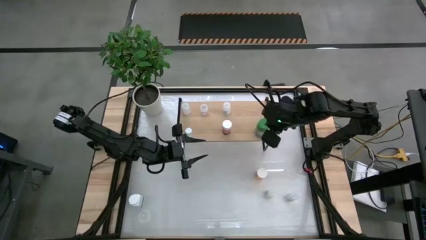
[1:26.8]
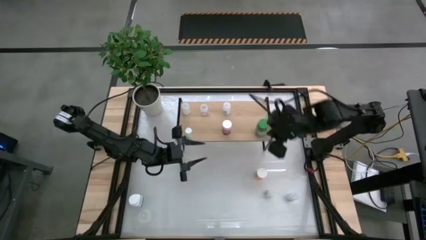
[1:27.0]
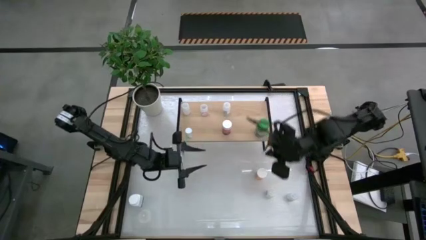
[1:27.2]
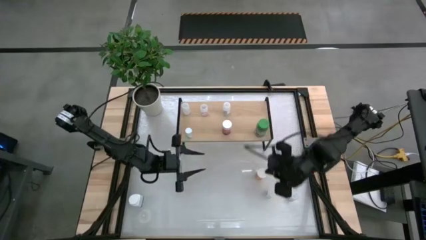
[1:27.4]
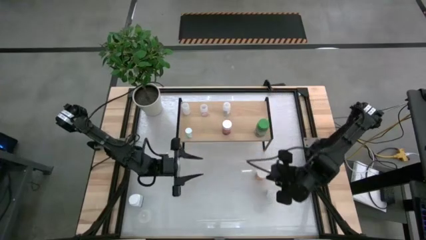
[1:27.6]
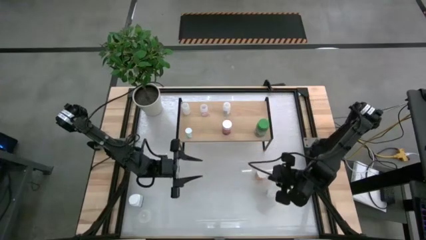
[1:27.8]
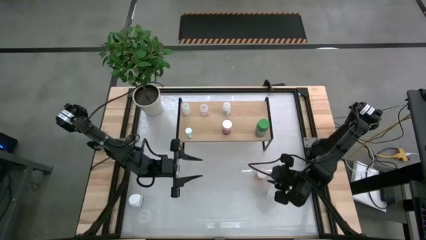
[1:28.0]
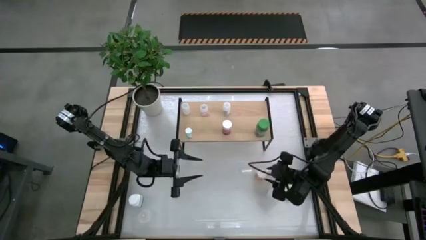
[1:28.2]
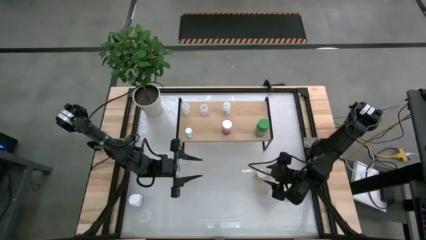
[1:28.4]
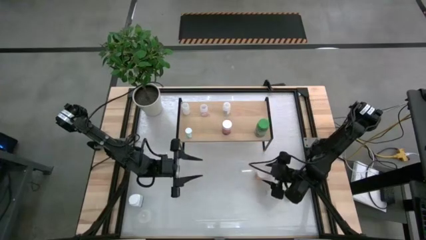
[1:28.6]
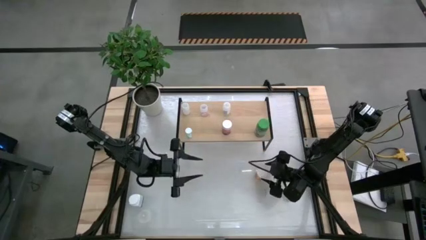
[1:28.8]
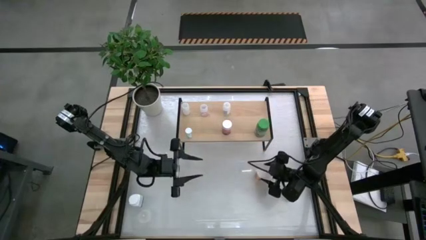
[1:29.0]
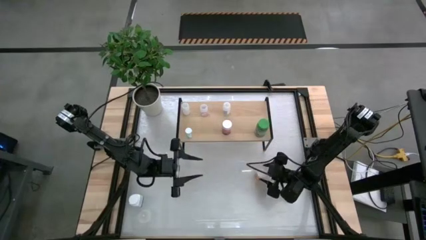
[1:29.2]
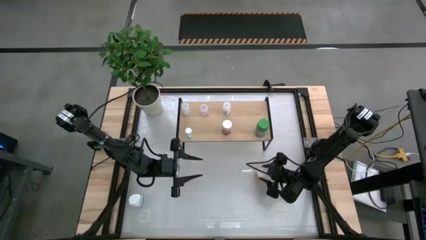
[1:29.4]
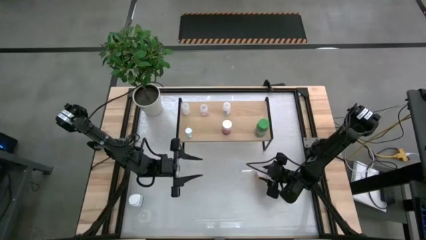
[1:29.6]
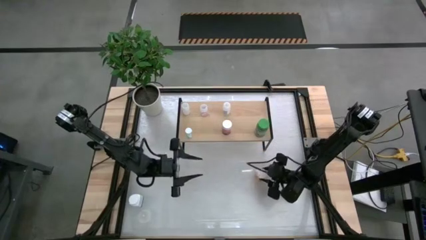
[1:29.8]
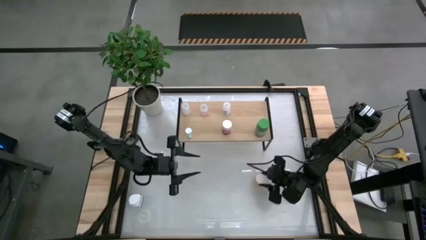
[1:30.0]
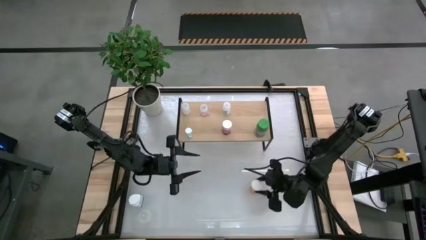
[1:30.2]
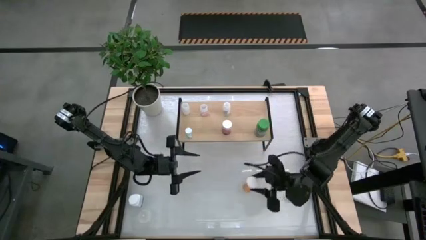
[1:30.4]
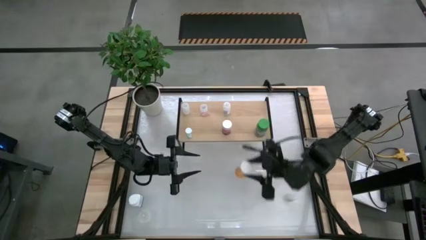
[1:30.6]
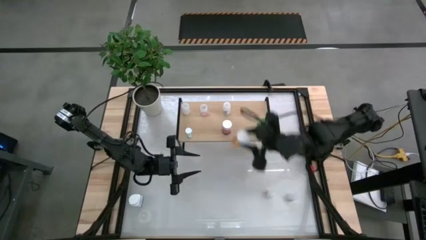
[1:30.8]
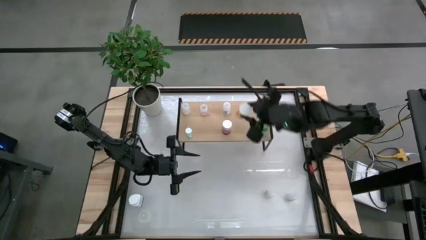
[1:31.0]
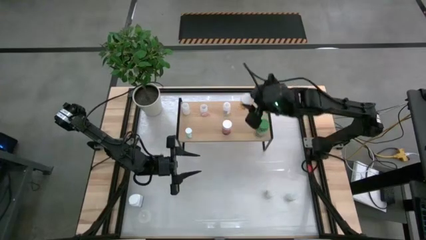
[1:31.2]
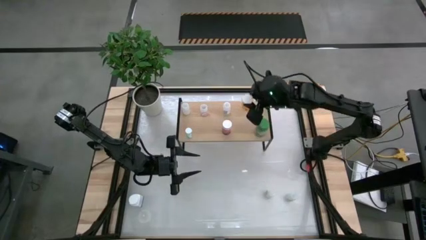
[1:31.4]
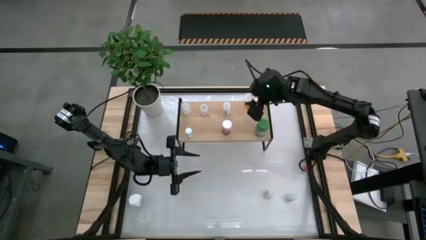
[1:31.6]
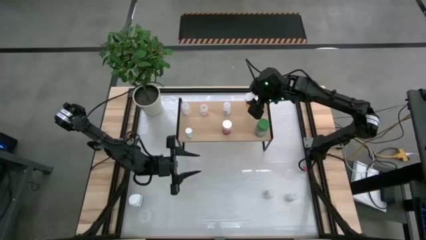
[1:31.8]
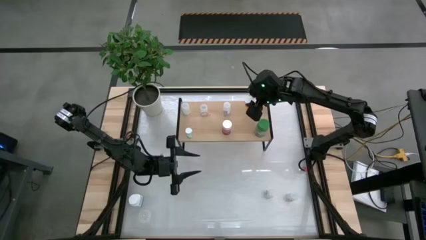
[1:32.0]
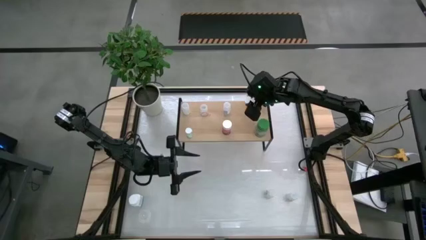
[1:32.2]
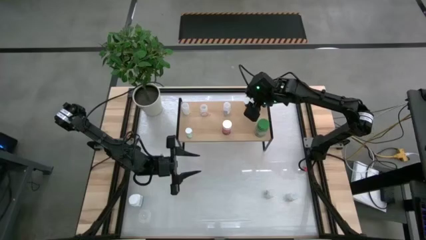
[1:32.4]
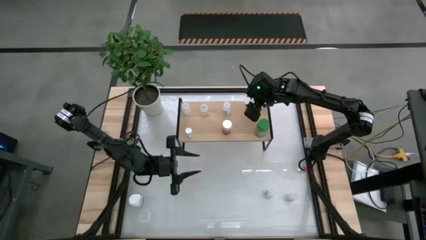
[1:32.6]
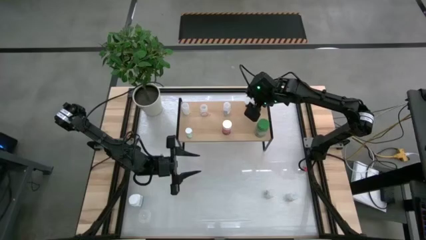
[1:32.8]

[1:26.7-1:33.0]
Task: Pick and place medicine bottles onto shelf by color
Put the orange transparent pill bottle on the shelf

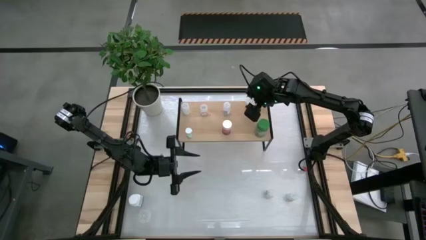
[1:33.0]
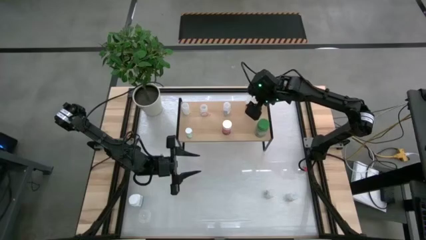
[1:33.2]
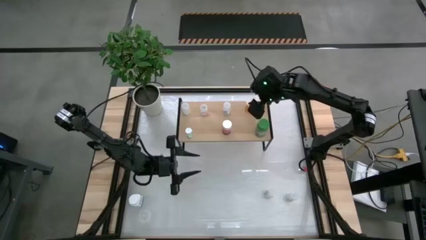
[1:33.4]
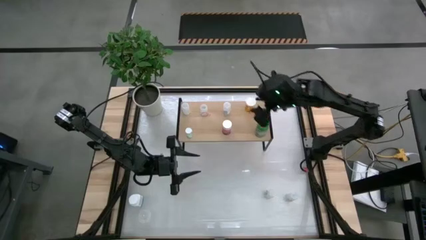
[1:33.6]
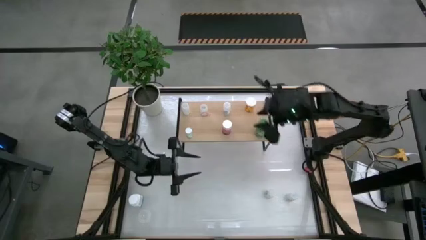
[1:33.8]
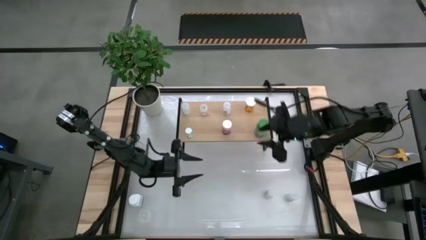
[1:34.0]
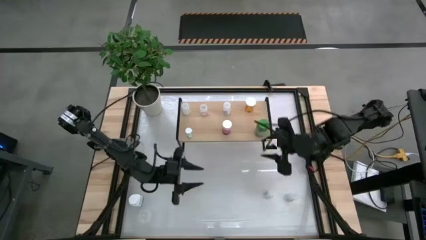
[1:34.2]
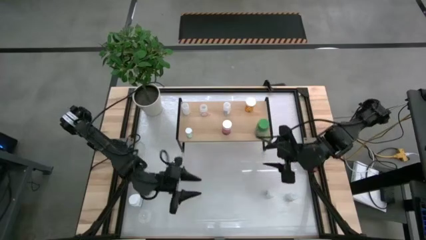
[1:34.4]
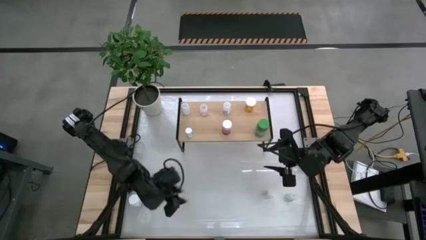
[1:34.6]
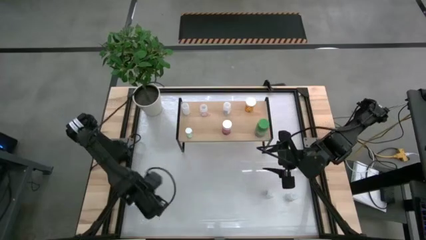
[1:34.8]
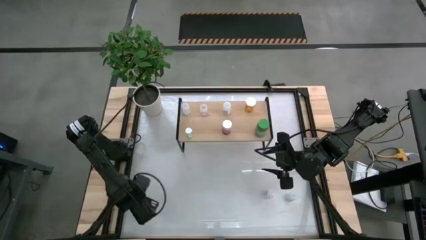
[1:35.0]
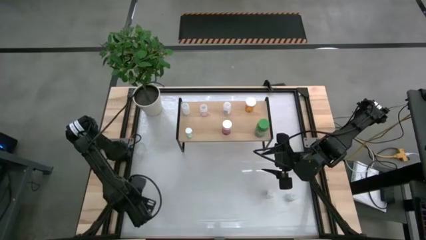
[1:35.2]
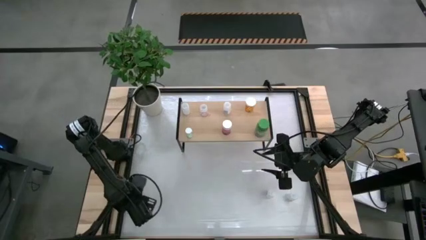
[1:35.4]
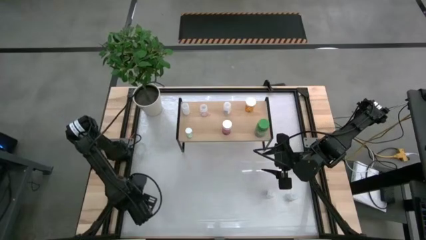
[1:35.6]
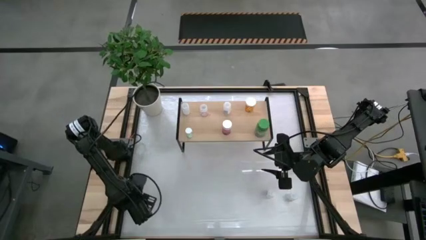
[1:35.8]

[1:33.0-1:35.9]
Put the white pill bottle on the shelf

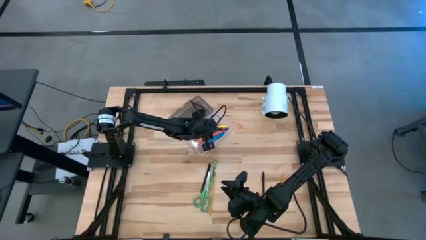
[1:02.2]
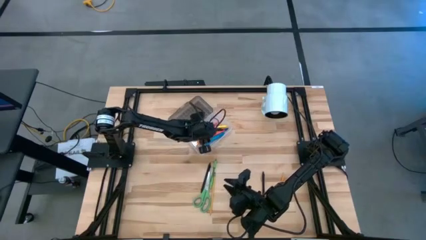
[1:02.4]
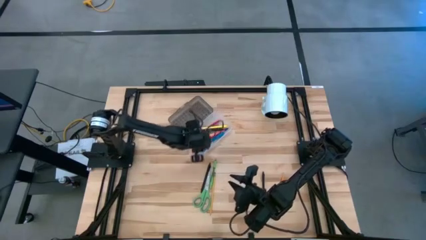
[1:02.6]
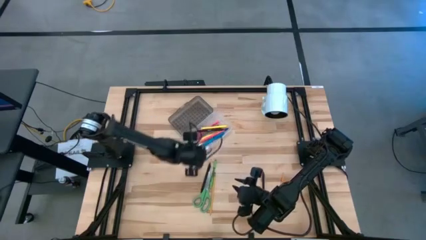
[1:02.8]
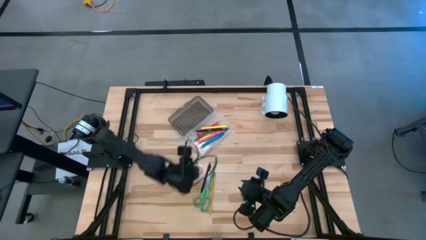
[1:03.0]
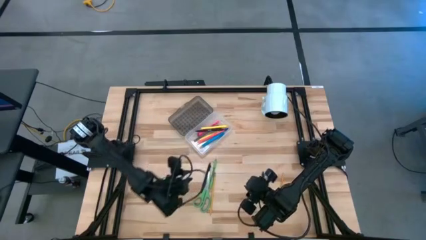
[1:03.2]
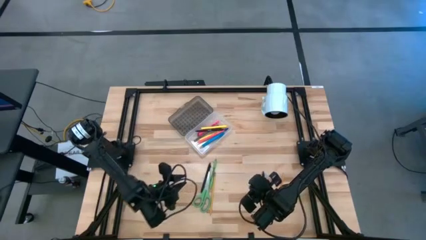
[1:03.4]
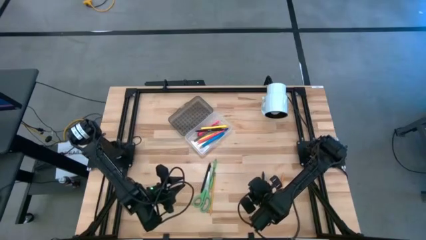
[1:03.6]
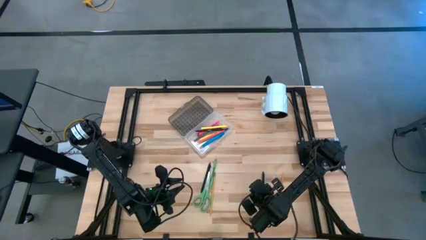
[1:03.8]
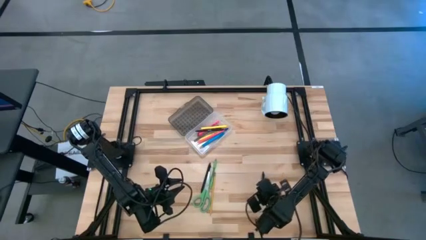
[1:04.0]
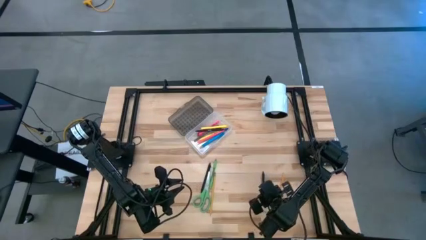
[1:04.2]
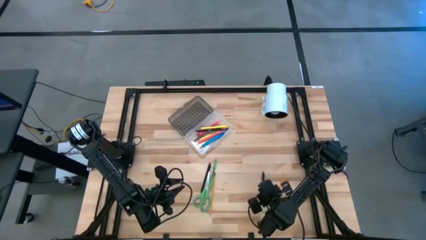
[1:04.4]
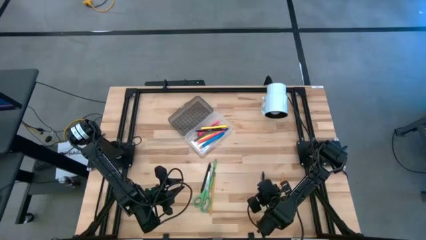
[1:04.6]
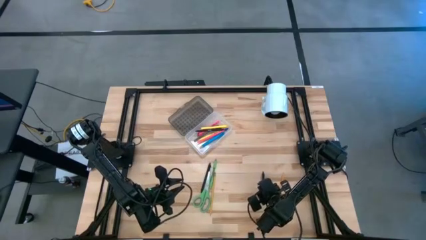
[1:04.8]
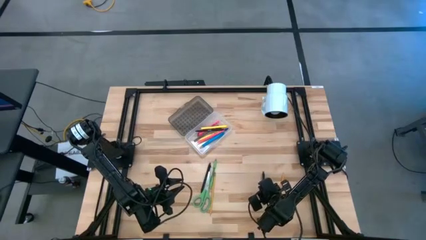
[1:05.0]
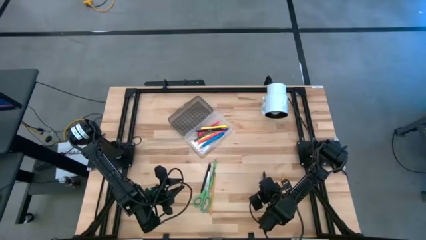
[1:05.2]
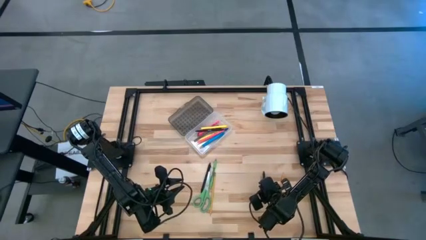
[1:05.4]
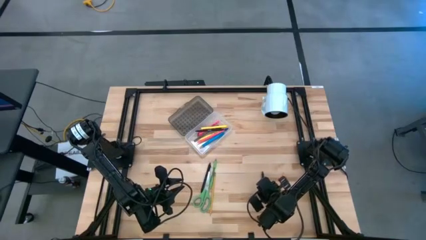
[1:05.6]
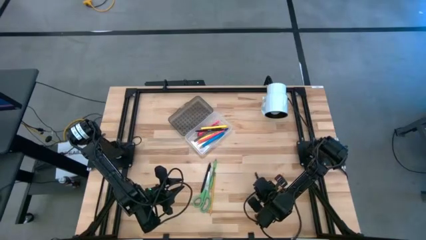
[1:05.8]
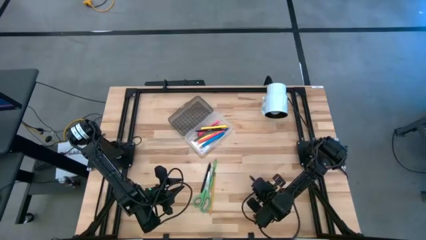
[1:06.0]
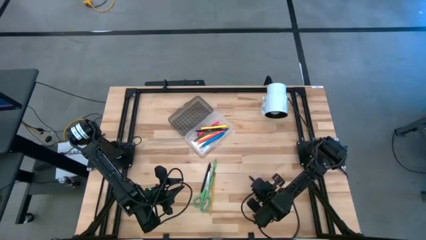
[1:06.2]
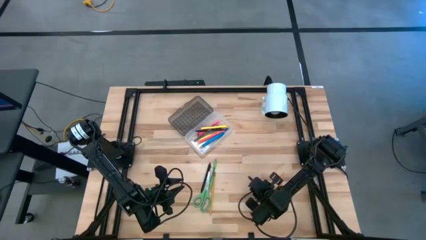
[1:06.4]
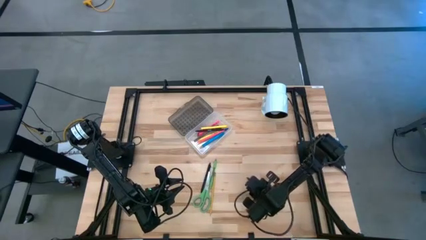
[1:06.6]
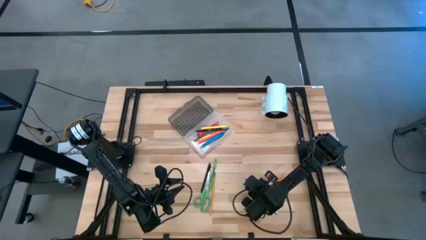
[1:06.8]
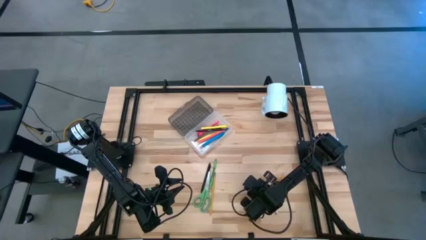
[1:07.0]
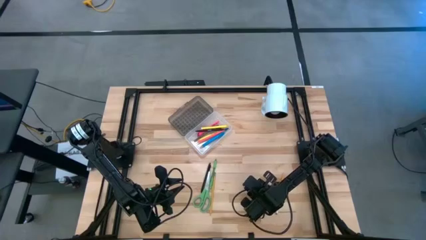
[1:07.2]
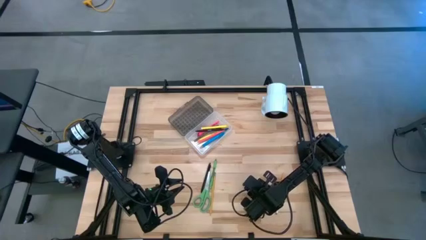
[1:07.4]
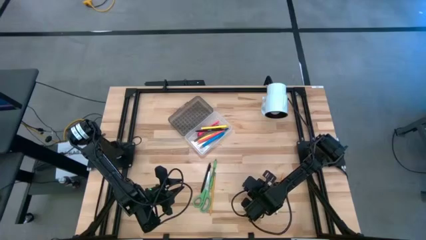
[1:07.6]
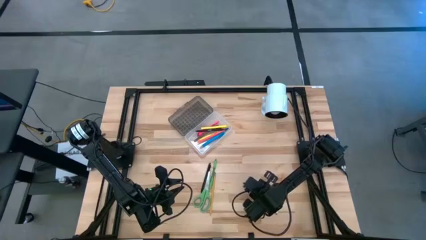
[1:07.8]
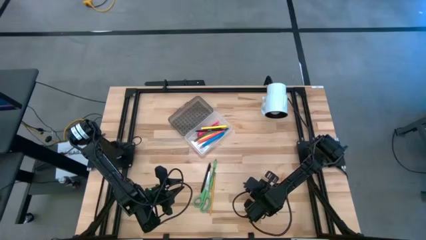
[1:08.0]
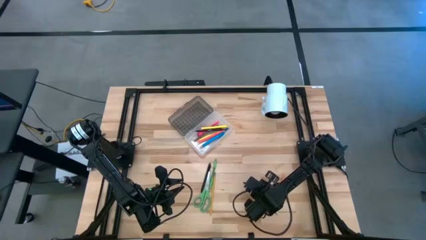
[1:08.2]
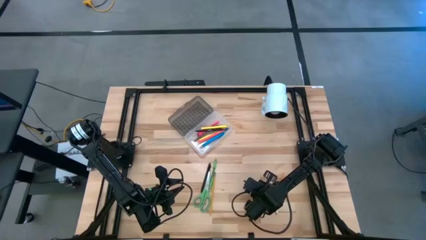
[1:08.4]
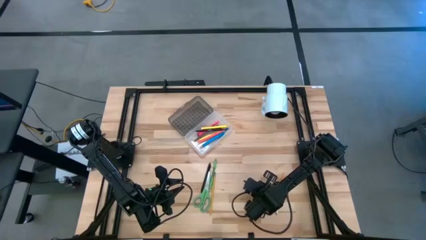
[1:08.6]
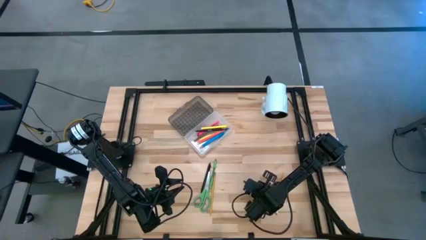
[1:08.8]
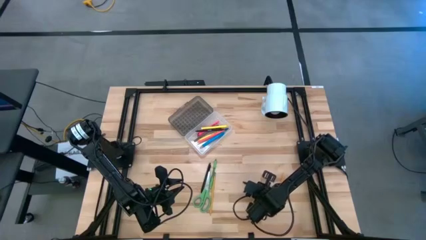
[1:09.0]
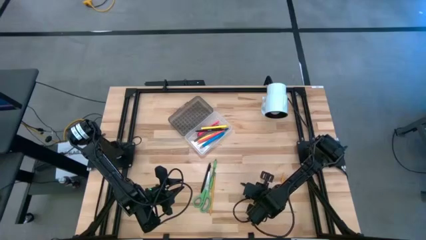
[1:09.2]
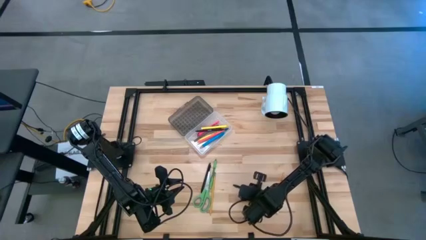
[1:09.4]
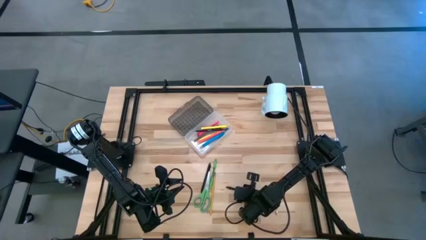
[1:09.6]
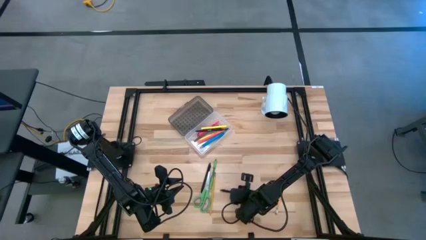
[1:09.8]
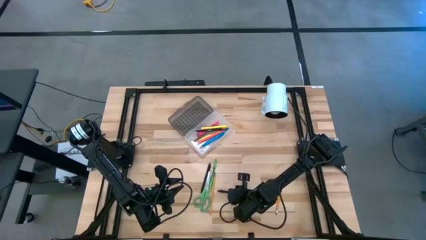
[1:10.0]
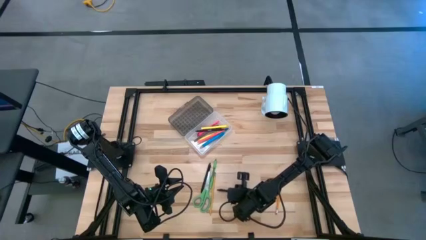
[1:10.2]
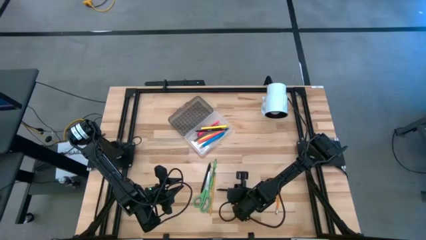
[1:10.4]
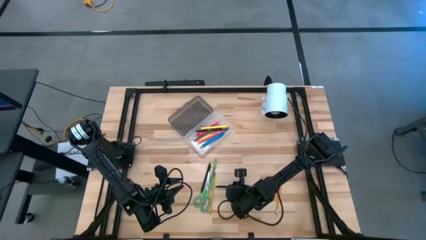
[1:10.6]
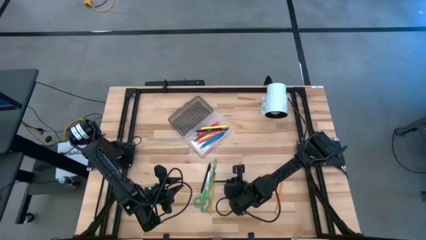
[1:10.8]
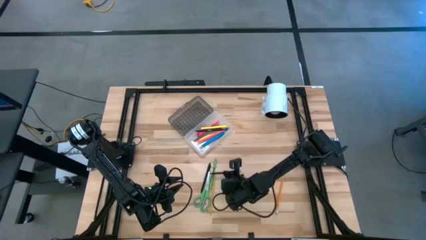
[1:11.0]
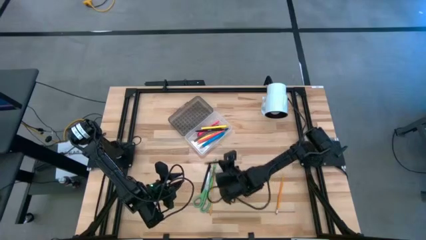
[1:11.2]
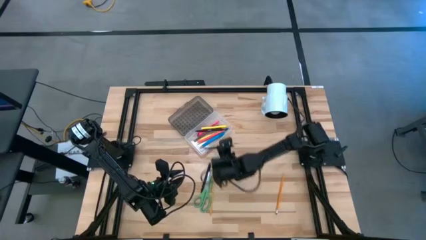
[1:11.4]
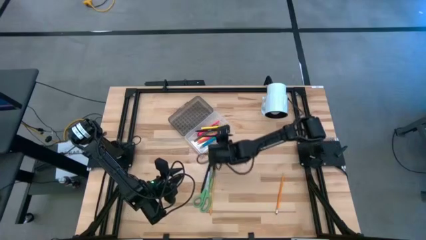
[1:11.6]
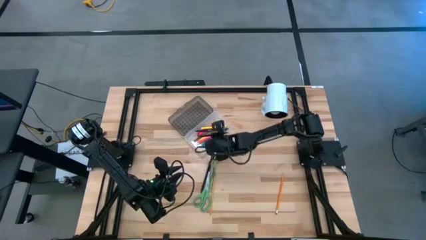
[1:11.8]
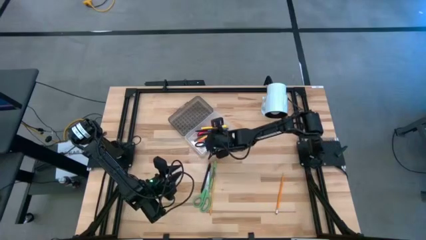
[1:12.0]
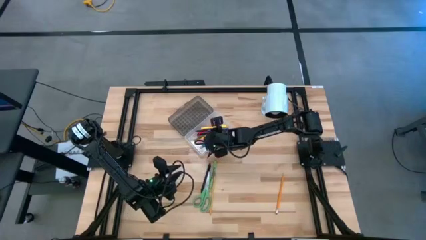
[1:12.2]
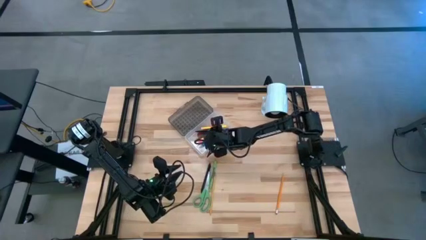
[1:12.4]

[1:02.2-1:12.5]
Task: Pick & place school supplies into a supply box
Put the right black pen into the transparent supply box
